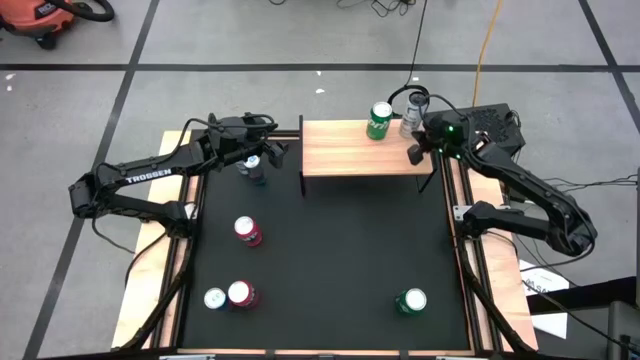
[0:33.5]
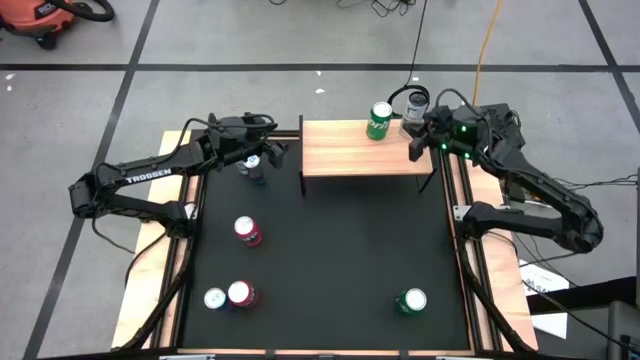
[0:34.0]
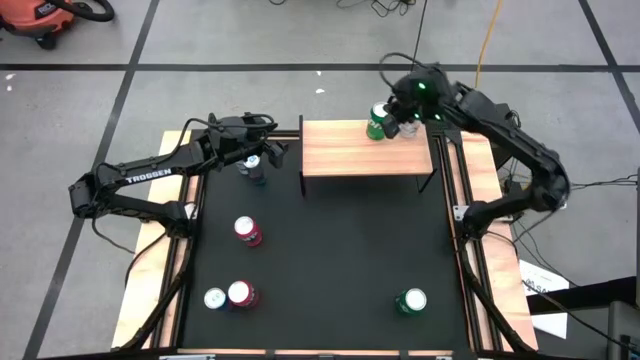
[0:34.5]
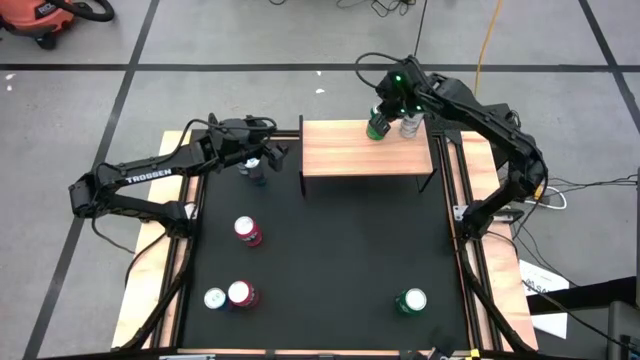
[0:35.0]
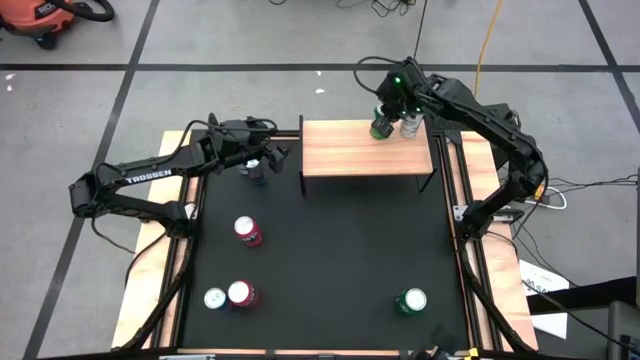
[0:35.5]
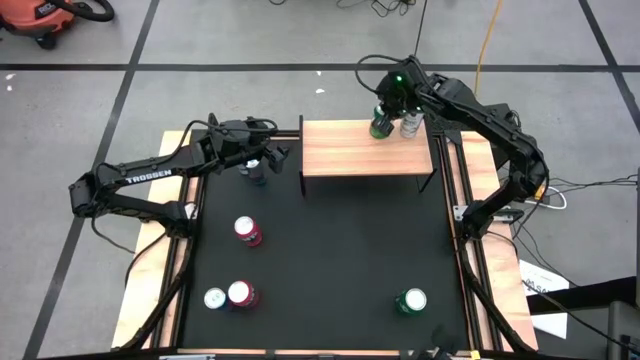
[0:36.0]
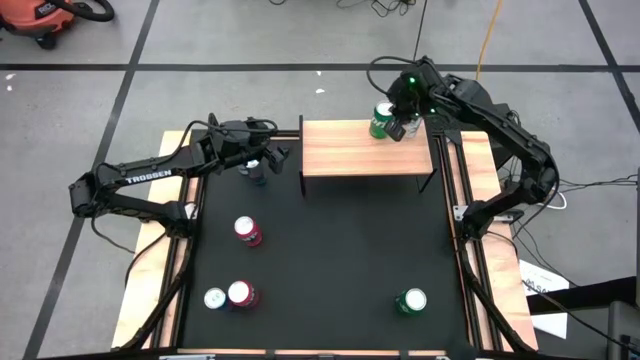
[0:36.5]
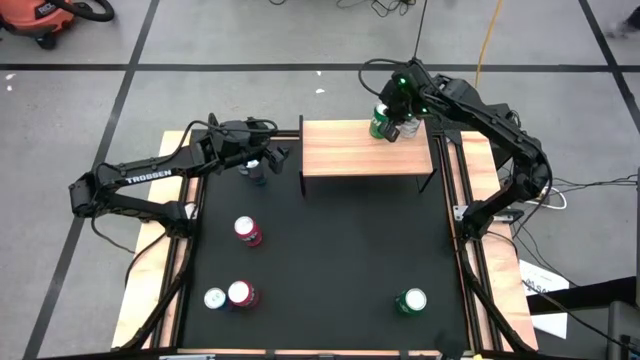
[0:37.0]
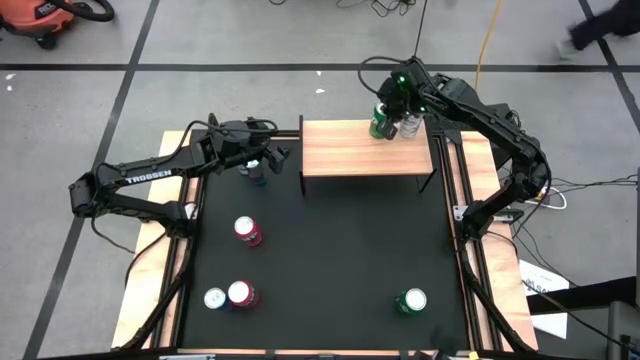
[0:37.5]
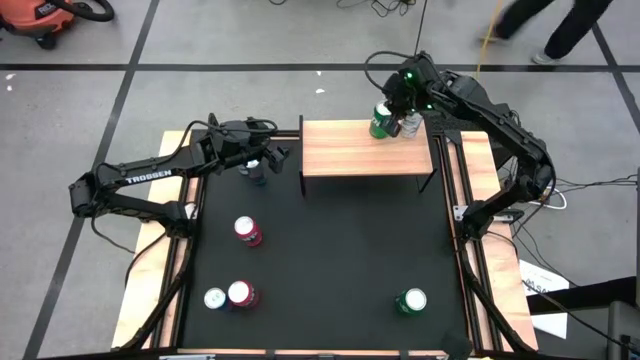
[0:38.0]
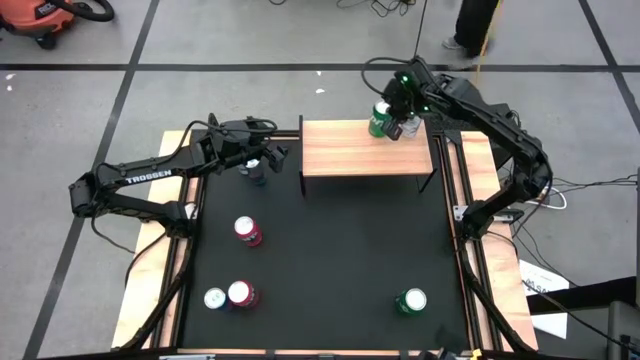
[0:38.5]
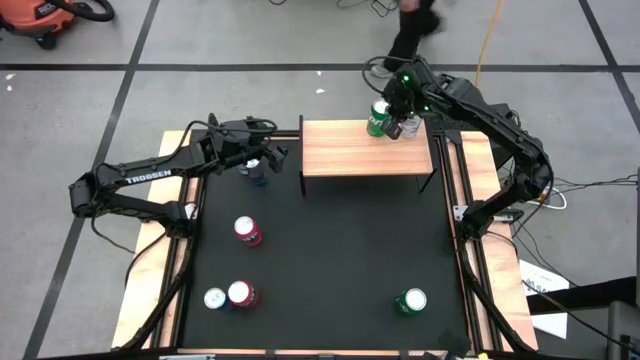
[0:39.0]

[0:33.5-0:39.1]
Task: Place canned beverage on shelf
Adjust the green can on the shelf

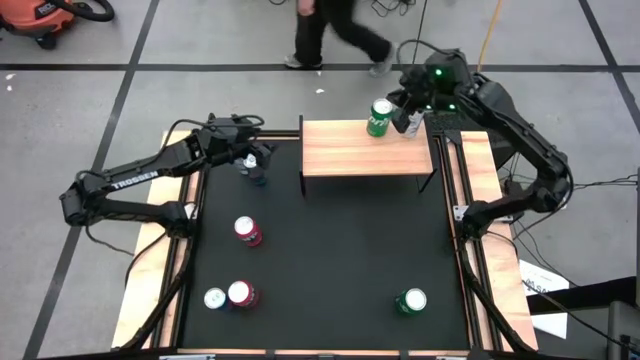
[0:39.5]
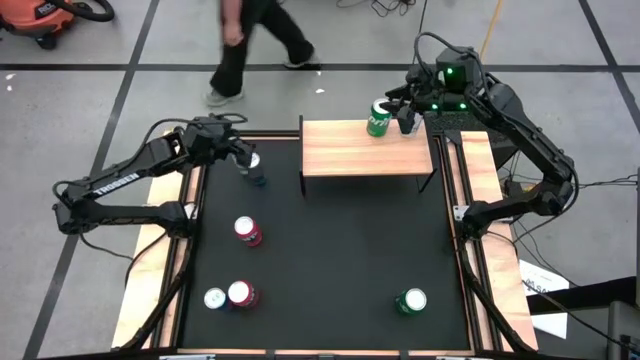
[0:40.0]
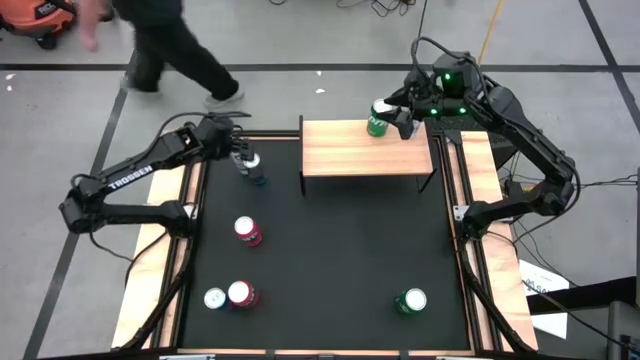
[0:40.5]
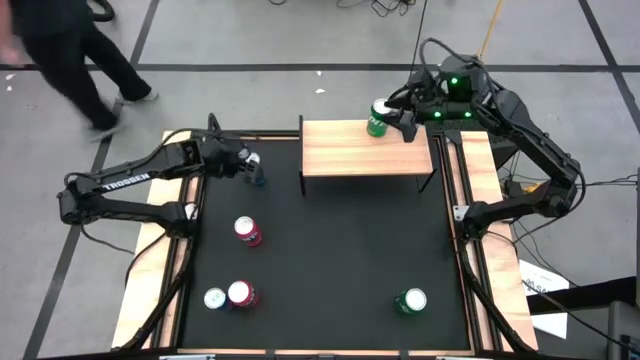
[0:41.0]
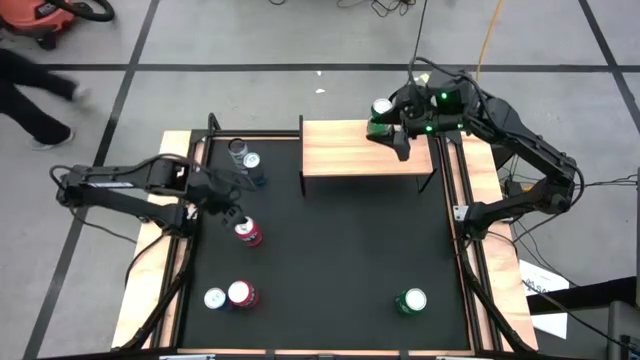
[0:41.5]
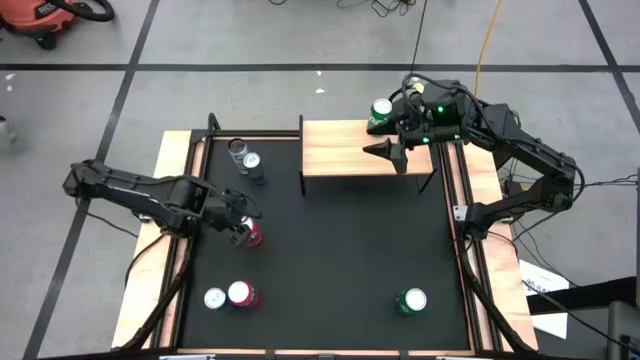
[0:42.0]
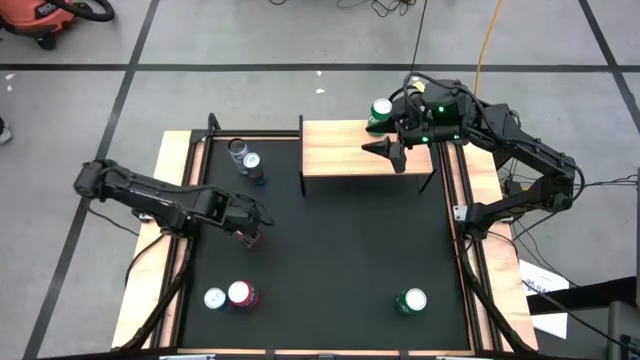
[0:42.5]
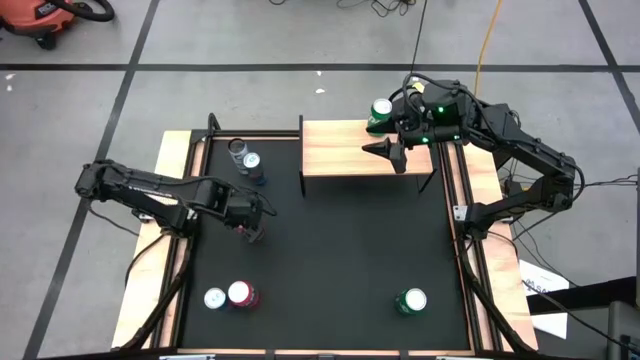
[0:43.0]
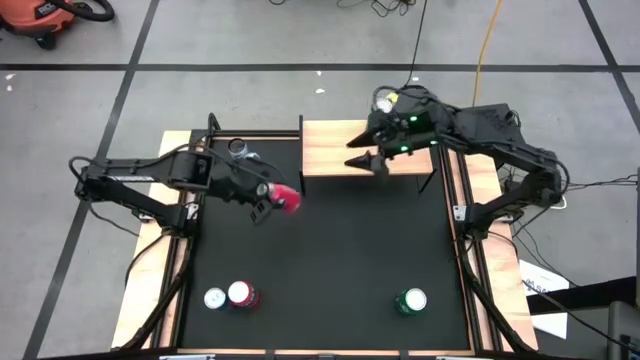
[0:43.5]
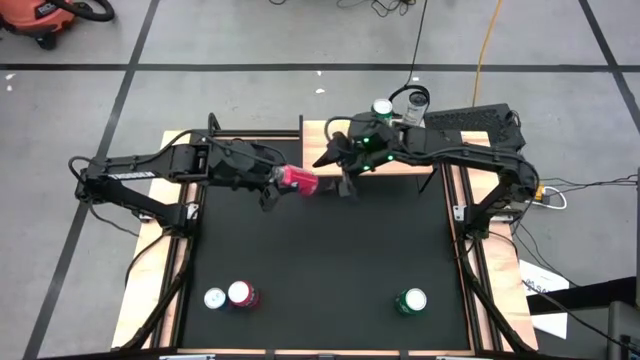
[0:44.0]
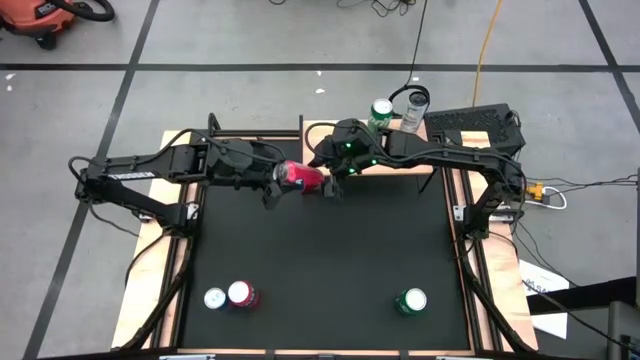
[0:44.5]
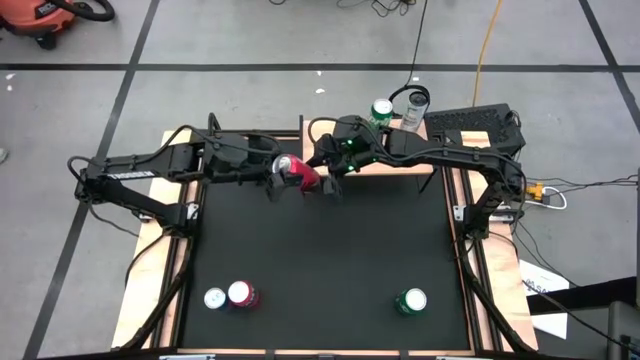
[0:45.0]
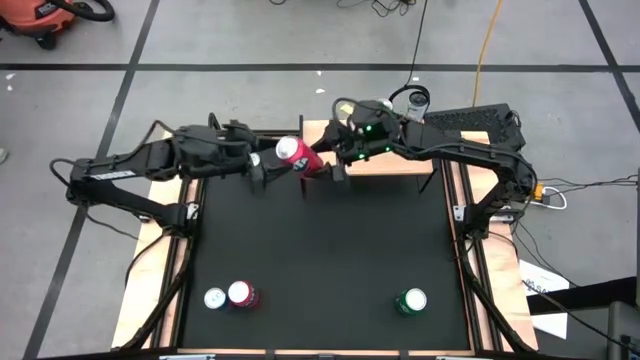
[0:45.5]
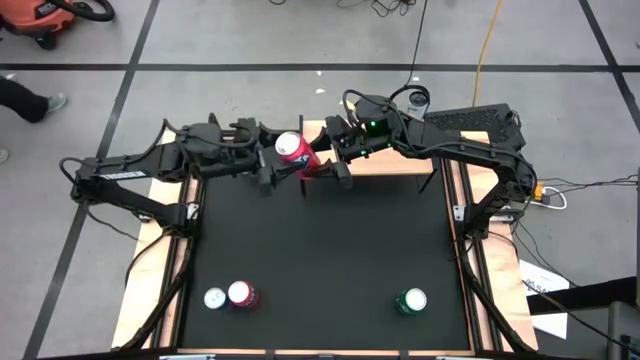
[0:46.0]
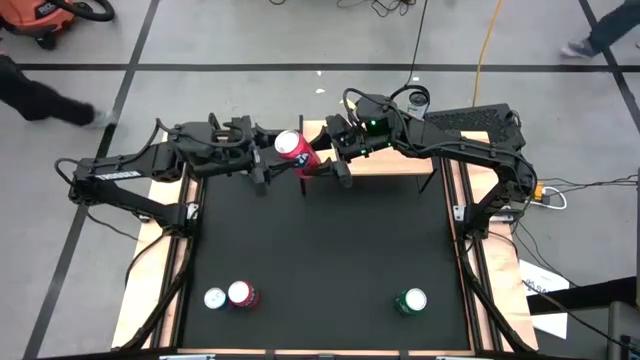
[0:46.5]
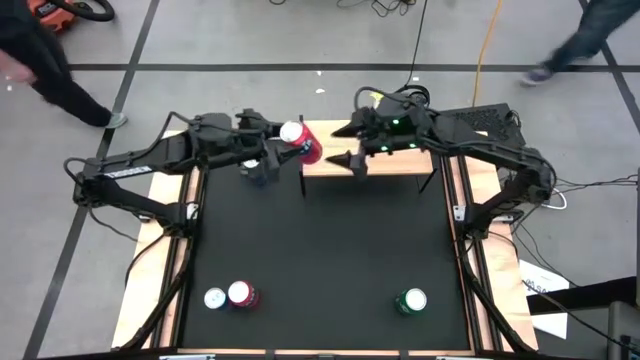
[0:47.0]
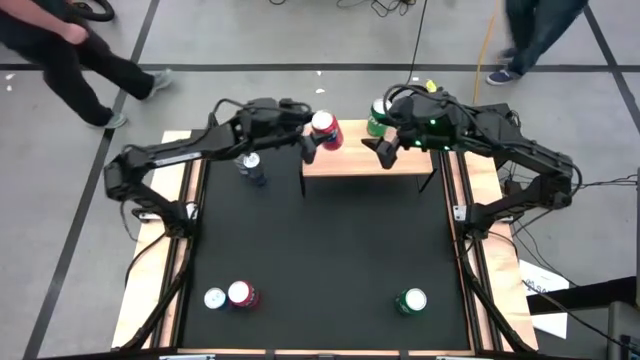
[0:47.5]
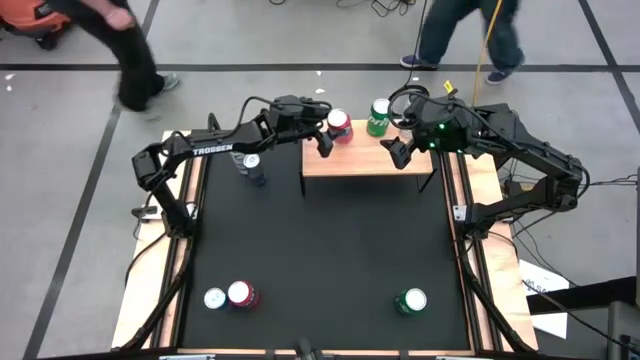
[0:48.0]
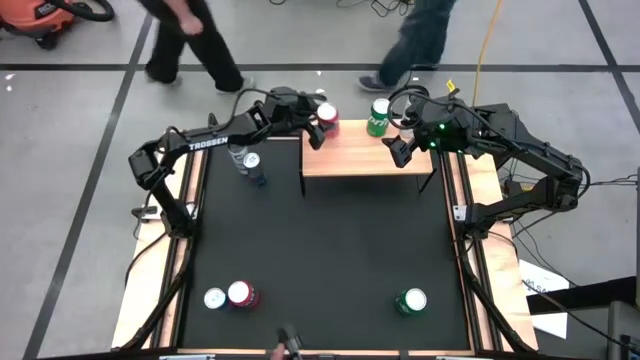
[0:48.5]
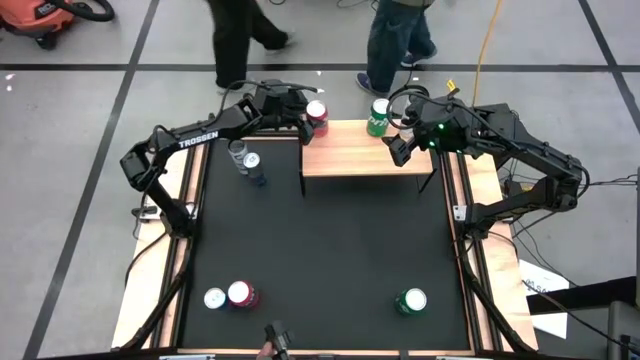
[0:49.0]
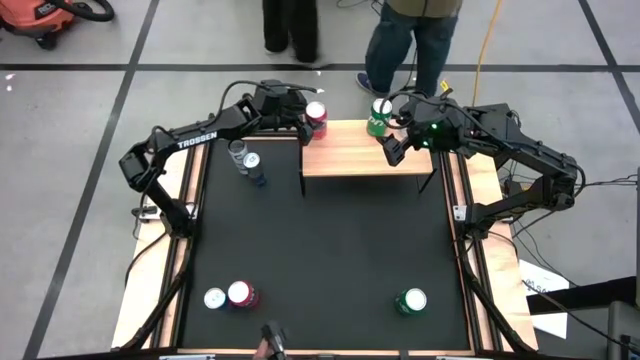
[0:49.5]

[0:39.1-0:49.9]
Put the top red soda can on the shelf

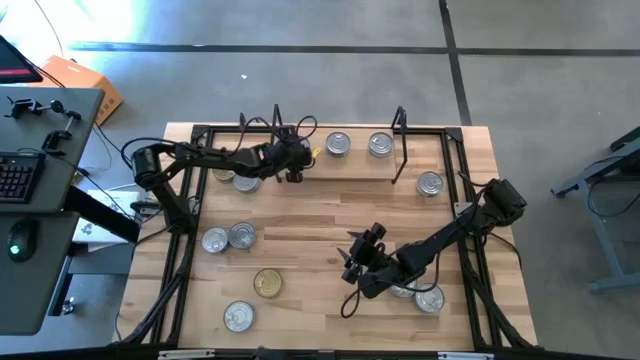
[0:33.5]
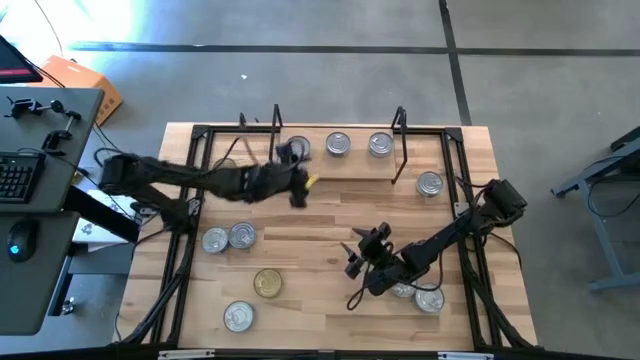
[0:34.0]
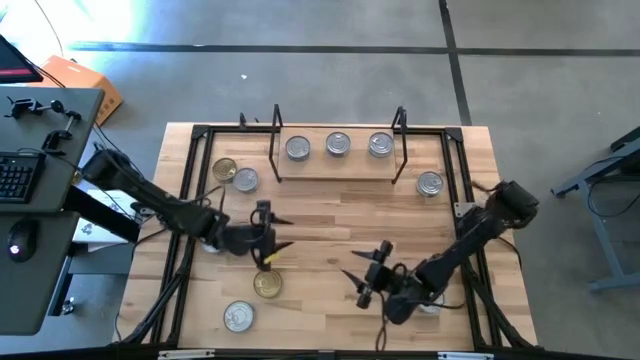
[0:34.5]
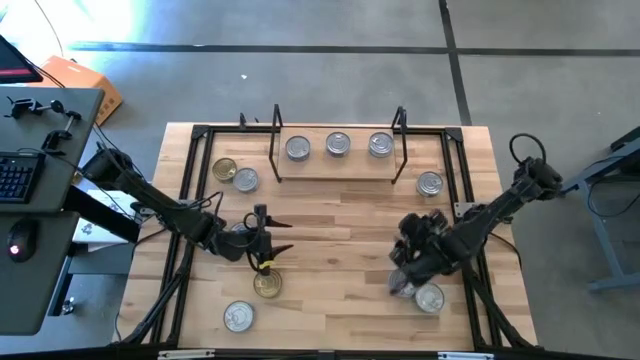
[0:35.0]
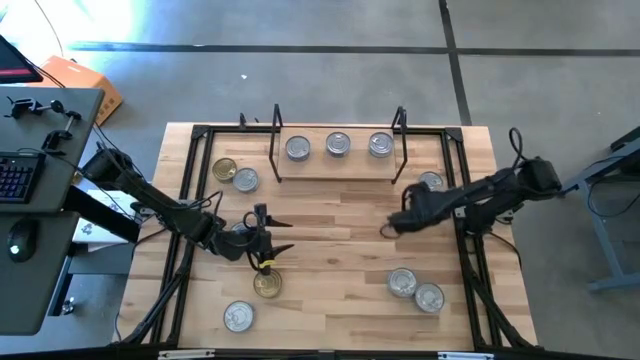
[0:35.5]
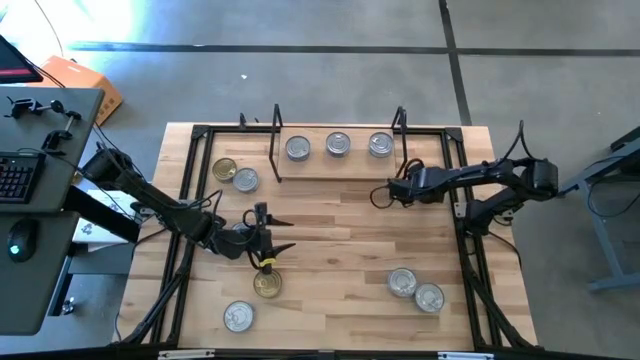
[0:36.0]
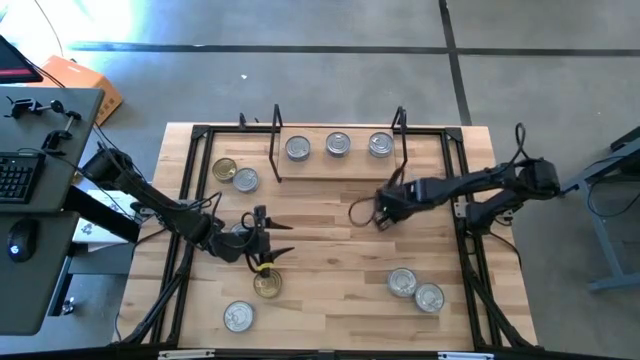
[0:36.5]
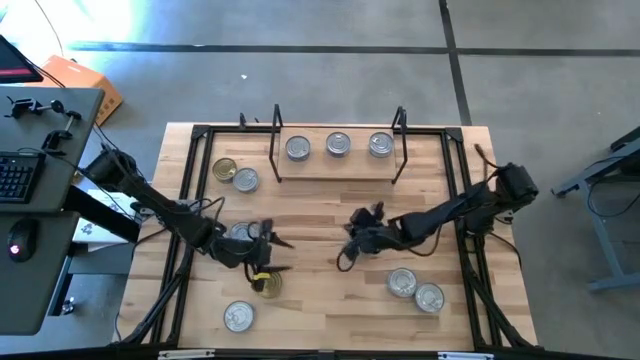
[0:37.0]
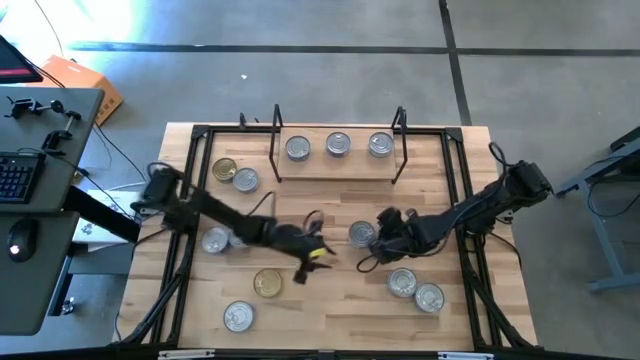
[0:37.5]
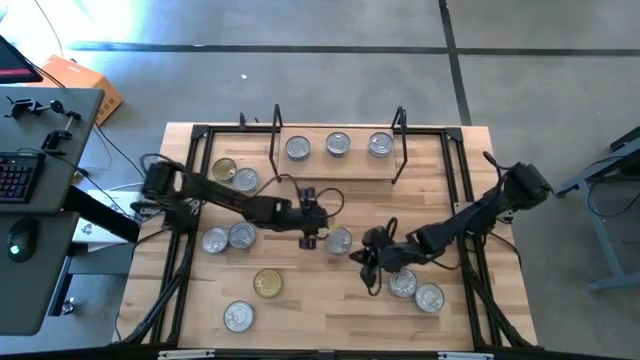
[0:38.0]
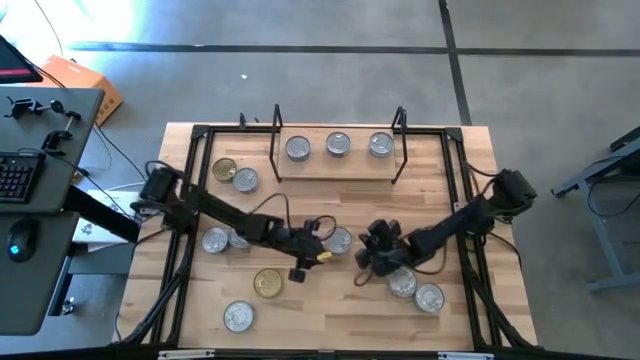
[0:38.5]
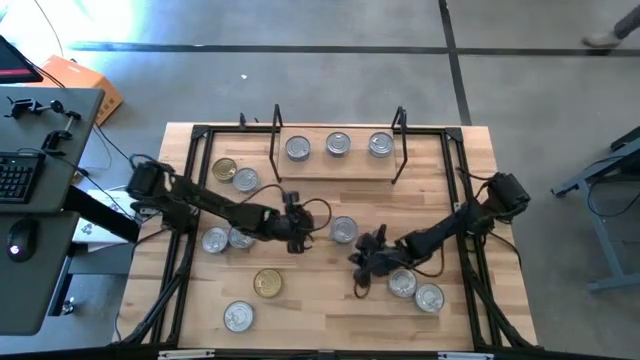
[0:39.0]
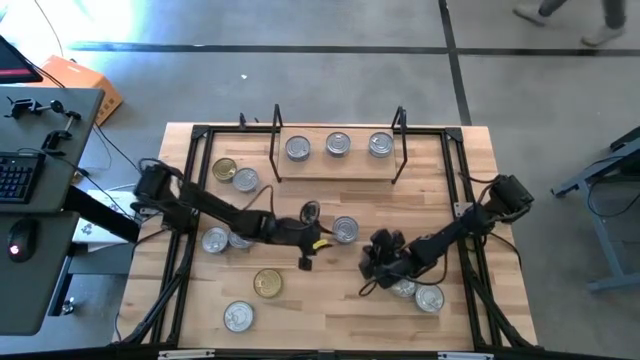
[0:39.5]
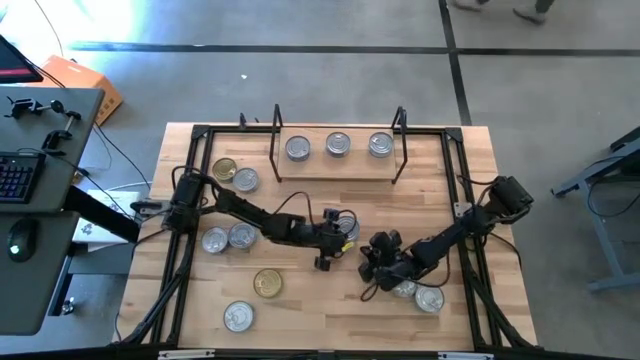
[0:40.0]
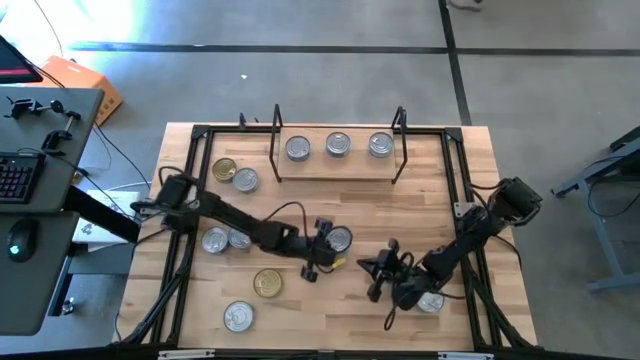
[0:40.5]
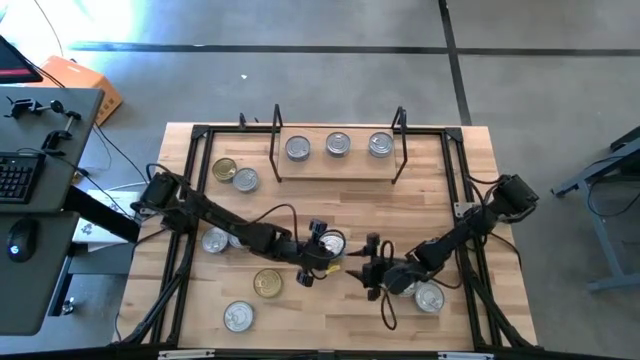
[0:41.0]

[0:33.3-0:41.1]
Task: Stack canned seafood by type on shelf
Put the green tuna can on the shelf
